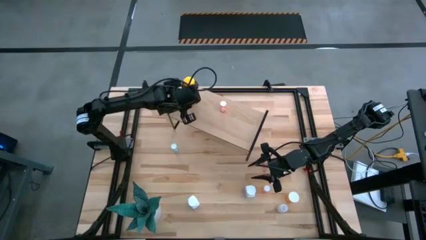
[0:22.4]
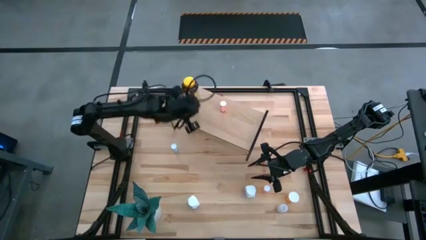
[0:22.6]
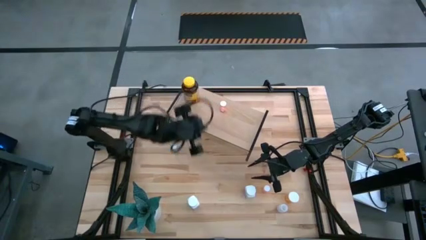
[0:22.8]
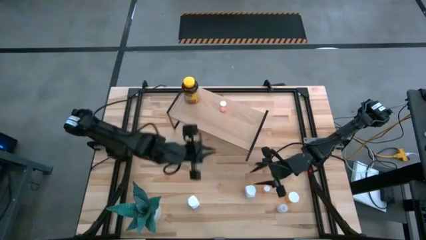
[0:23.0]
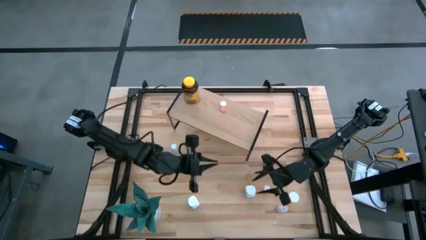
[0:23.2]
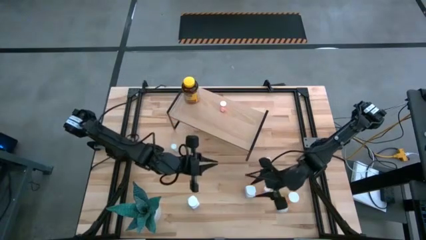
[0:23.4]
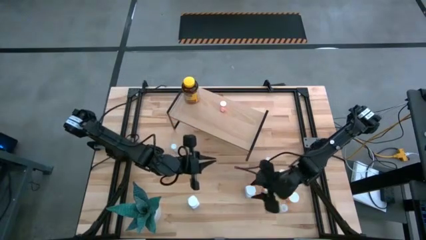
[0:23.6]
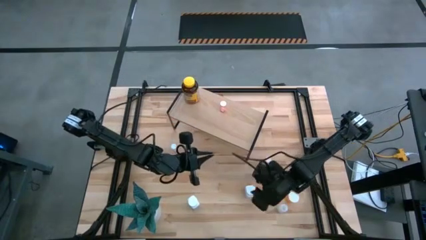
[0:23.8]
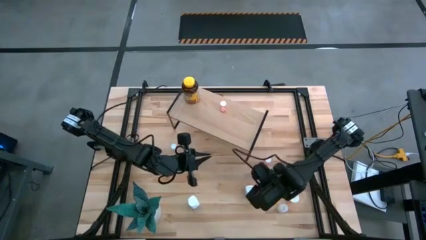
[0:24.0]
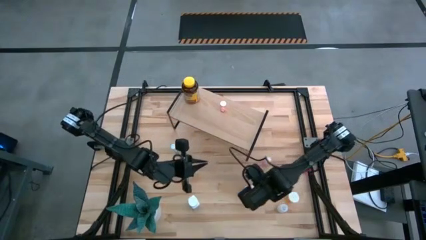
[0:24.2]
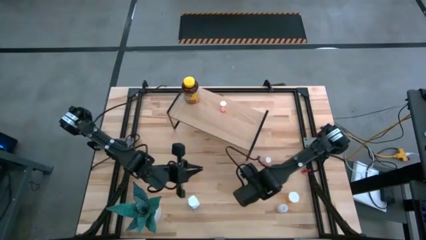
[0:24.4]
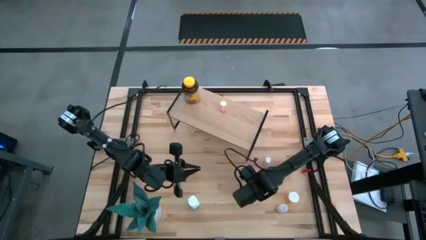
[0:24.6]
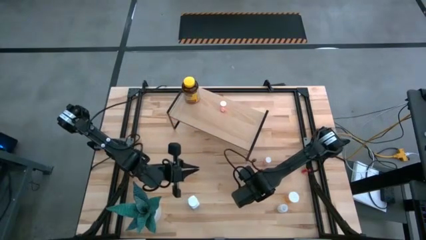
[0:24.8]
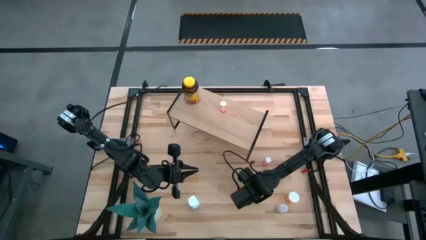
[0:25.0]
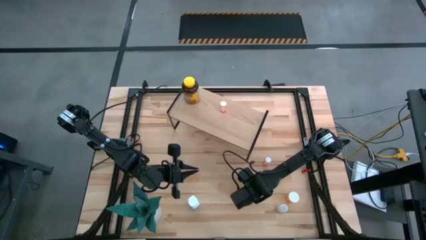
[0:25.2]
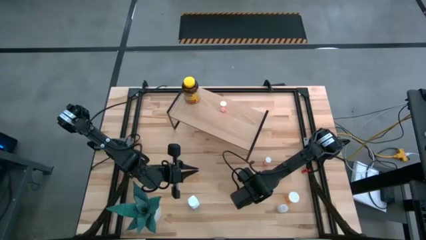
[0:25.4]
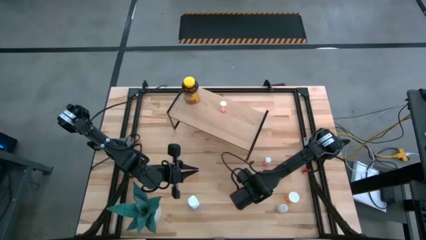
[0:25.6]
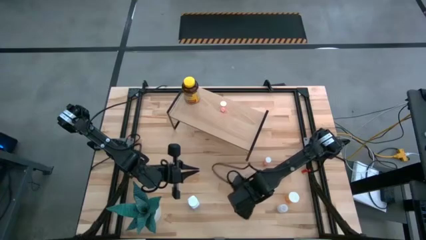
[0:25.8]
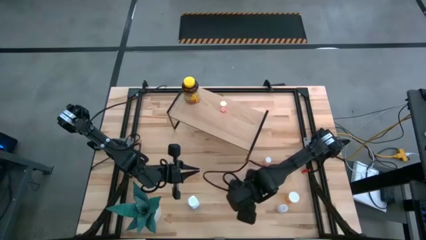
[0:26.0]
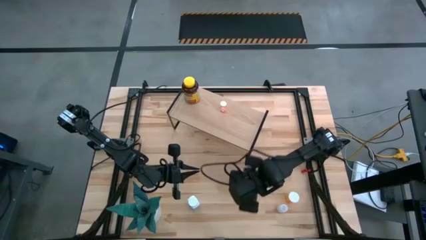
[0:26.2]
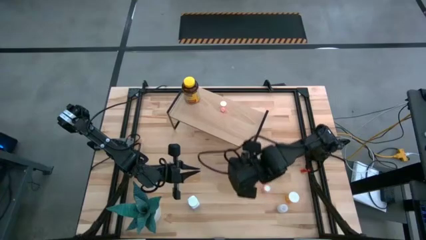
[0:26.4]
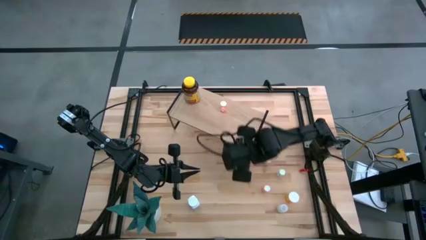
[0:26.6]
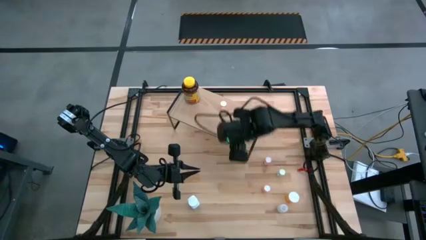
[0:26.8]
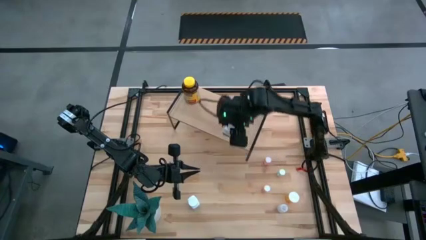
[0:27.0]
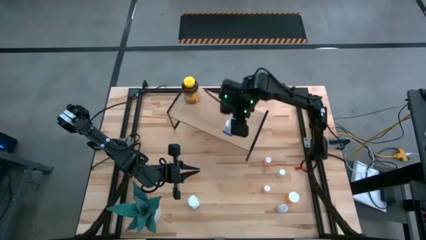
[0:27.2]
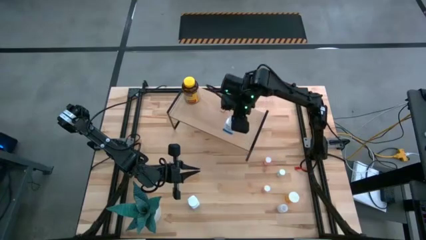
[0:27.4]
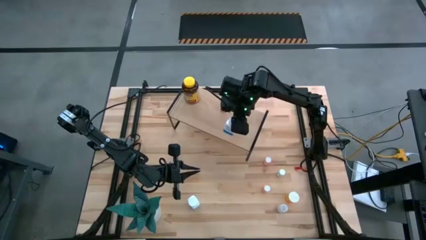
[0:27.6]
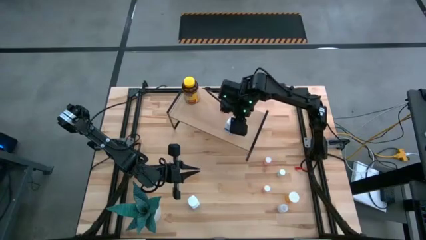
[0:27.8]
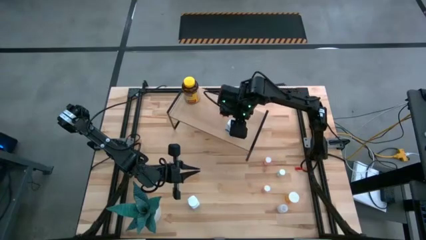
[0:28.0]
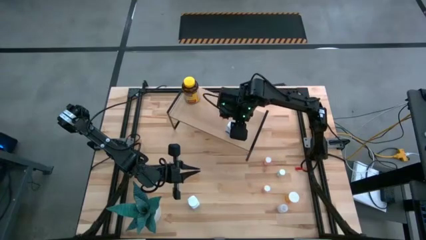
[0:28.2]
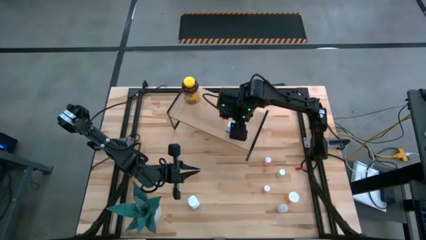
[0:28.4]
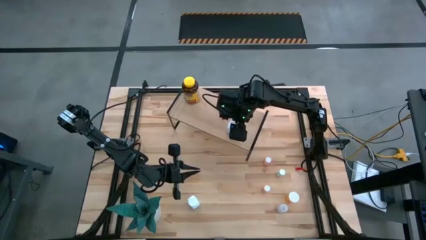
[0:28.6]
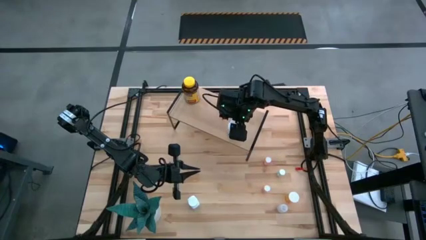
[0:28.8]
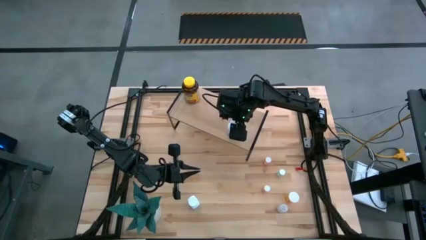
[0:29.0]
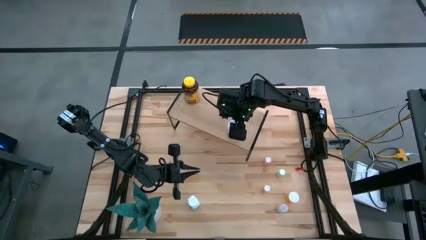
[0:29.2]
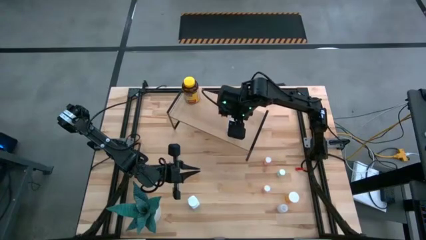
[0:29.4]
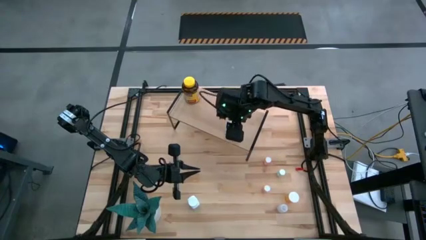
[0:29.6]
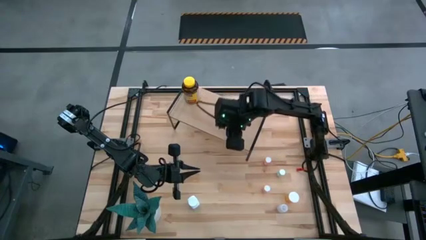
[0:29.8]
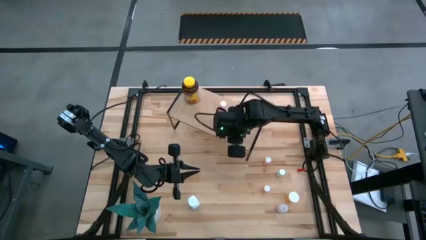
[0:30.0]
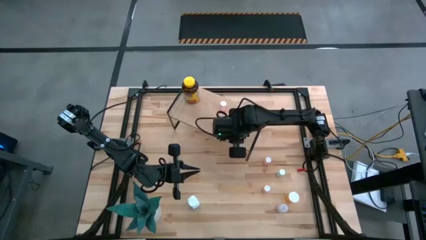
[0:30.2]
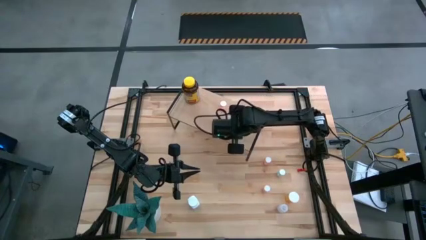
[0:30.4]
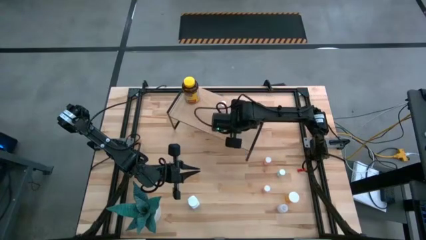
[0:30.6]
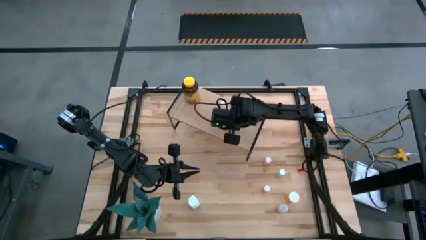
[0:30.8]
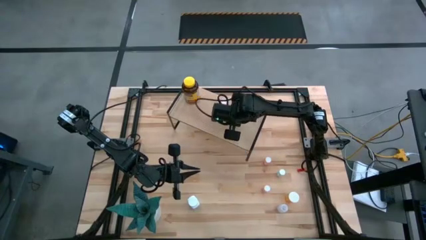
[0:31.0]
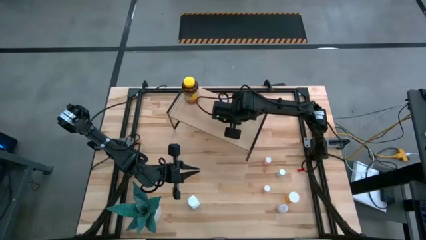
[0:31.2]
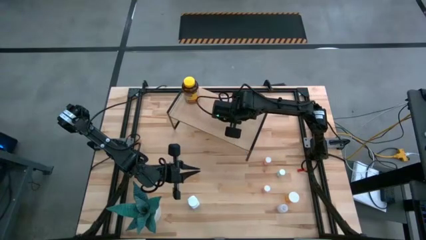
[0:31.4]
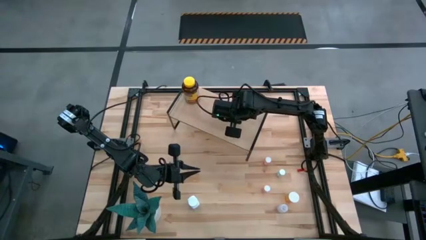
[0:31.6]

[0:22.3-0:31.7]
Task: Pick and place medicine bottles onto shelf by color
Put the right white pill bottle on the shelf

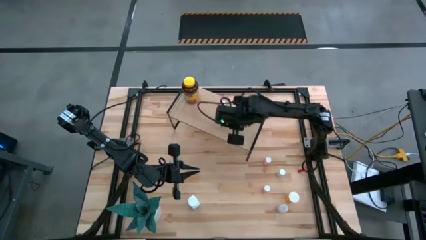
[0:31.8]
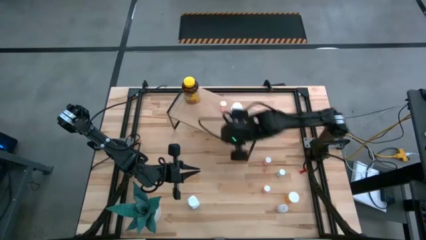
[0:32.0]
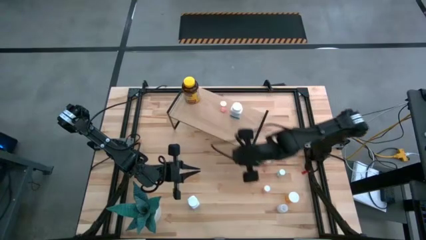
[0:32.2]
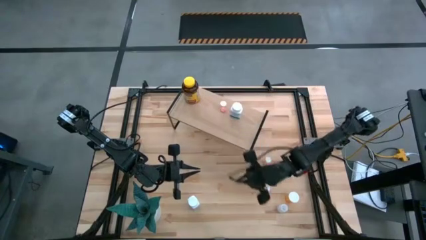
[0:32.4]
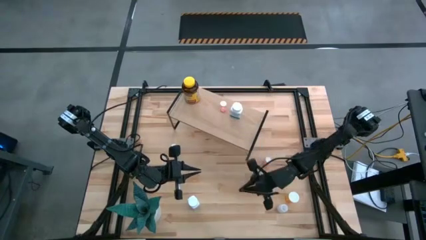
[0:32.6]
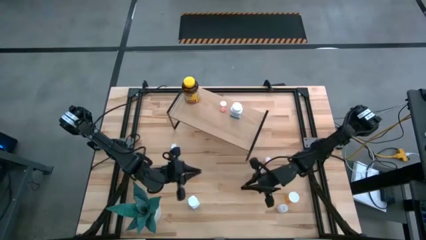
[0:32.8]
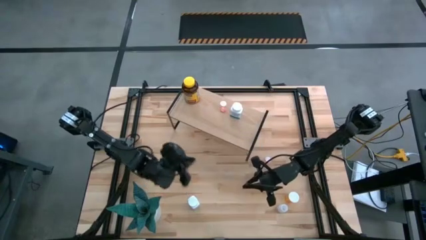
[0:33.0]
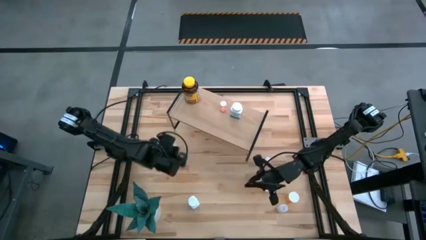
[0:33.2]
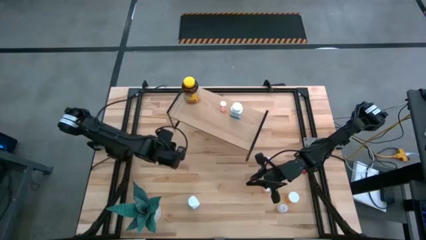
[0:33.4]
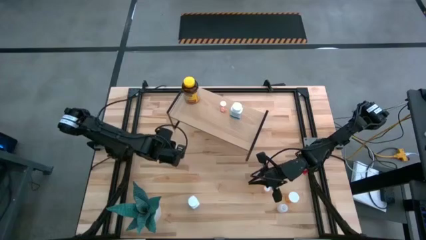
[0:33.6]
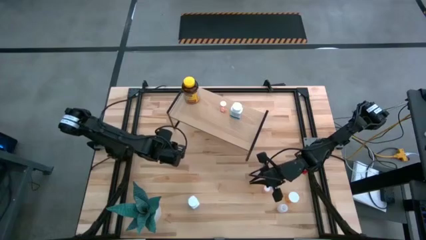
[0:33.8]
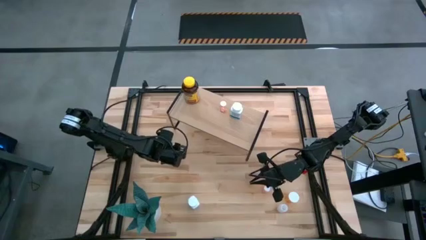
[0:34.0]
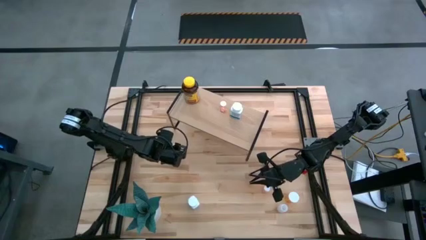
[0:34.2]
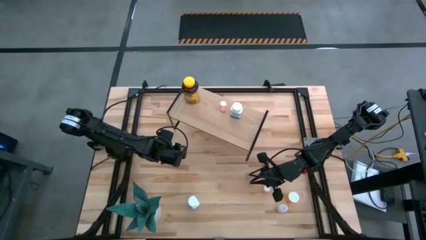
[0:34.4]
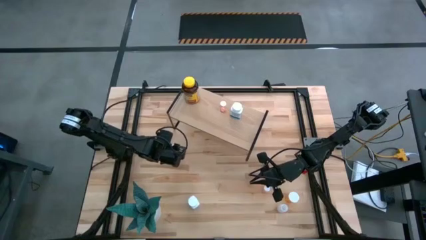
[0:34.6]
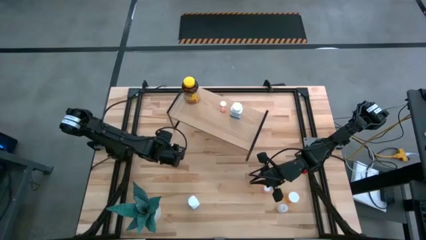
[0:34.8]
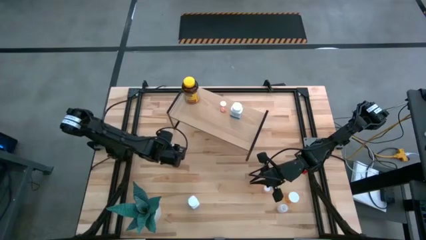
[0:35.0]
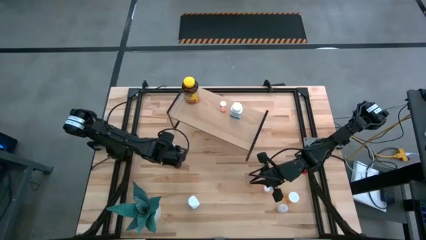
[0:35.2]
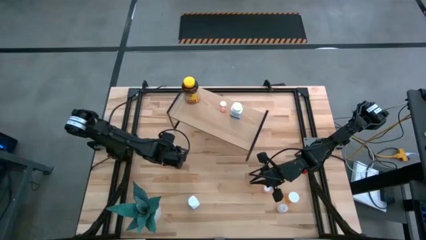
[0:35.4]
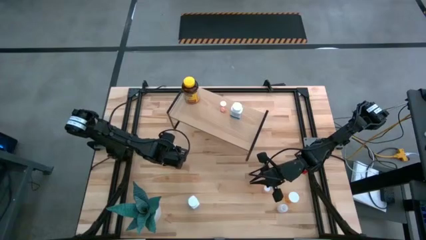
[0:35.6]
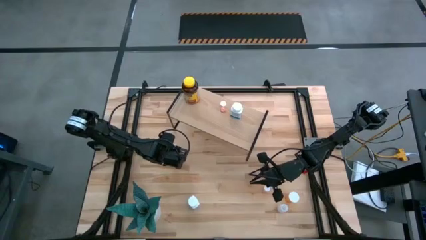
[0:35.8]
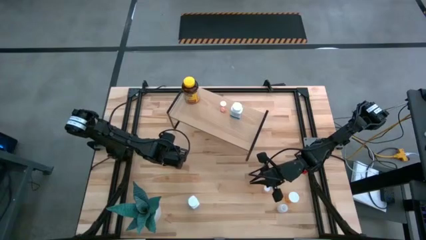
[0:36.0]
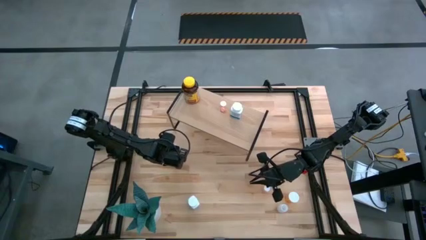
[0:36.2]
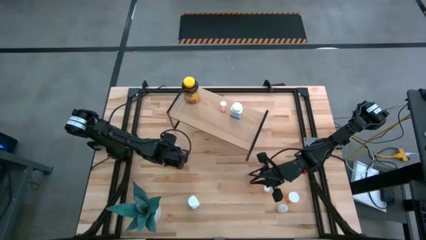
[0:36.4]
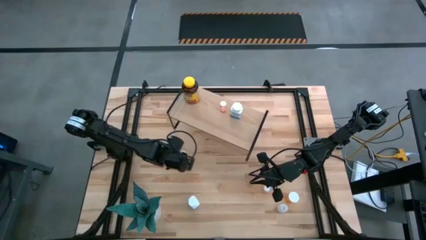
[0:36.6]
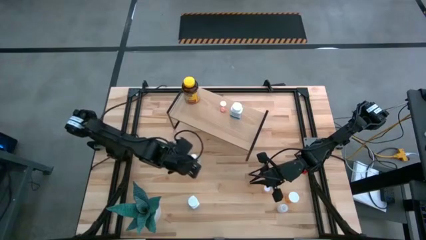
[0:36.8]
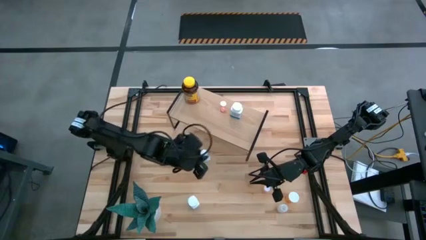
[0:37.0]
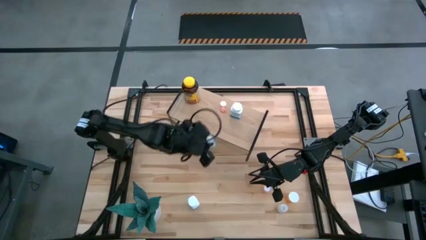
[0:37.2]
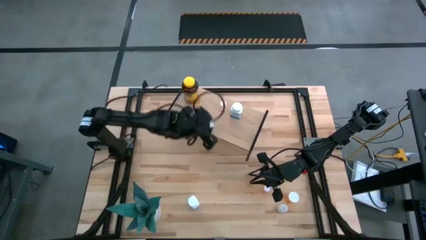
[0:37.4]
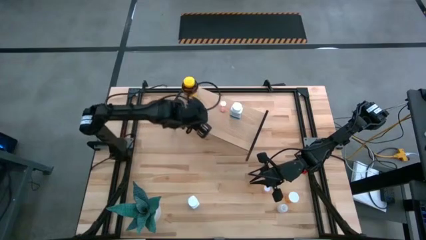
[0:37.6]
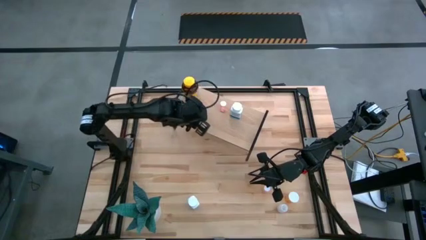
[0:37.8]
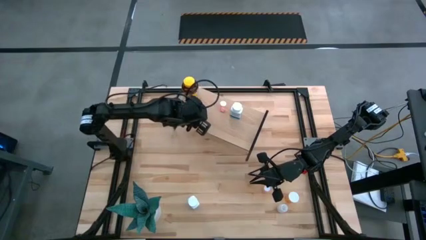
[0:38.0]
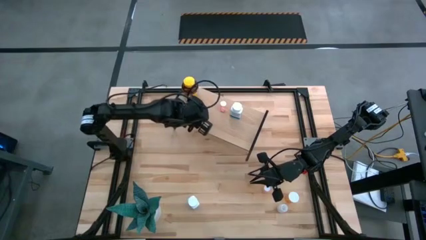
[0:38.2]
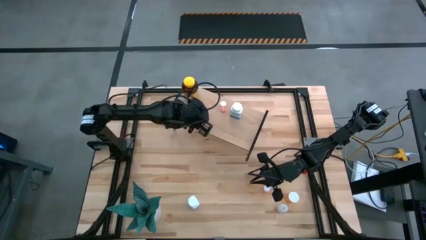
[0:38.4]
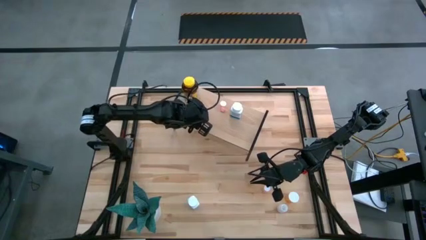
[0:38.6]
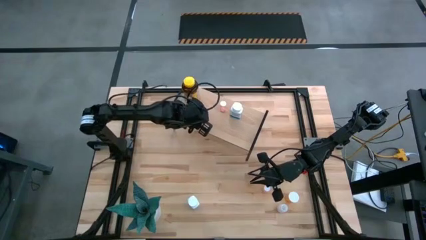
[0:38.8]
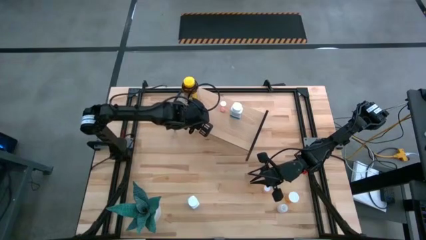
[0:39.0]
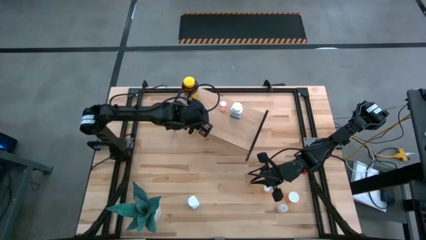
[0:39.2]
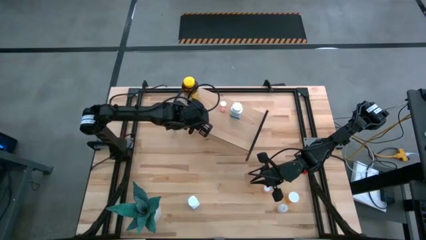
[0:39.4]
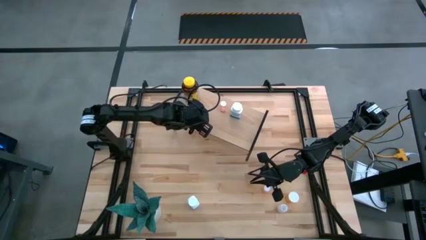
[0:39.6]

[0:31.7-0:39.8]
Put the left blue pill bottle on the shelf
